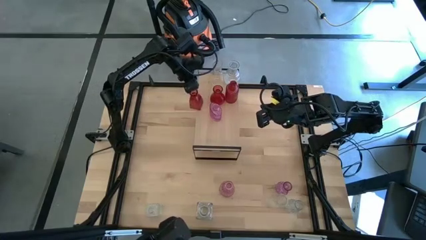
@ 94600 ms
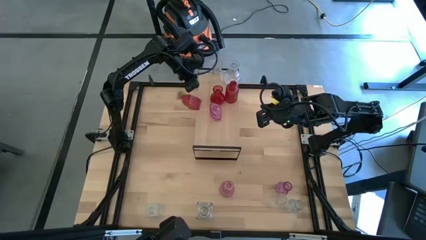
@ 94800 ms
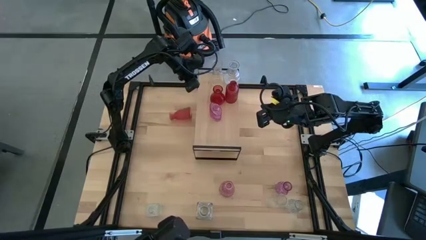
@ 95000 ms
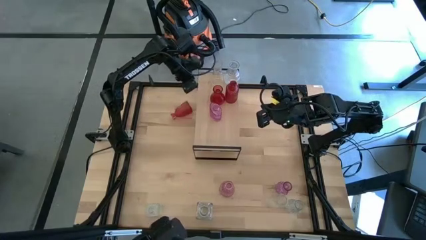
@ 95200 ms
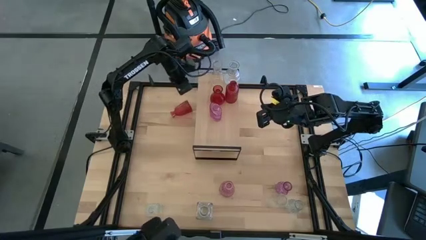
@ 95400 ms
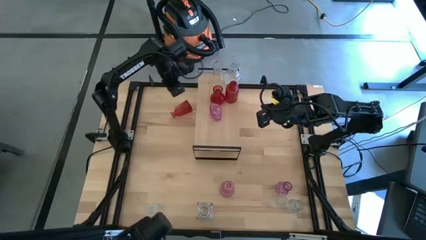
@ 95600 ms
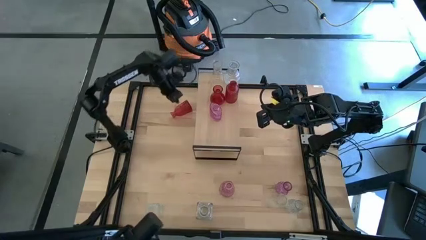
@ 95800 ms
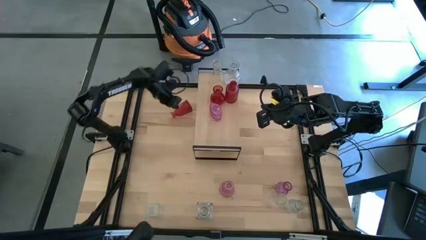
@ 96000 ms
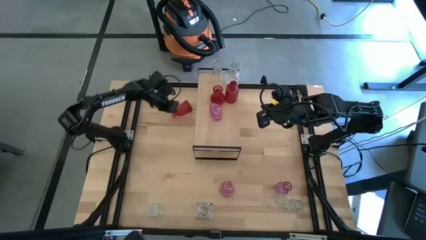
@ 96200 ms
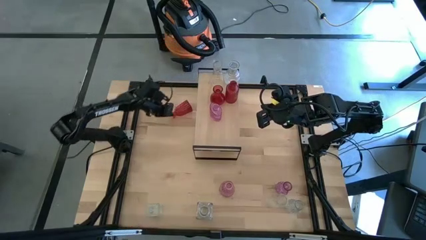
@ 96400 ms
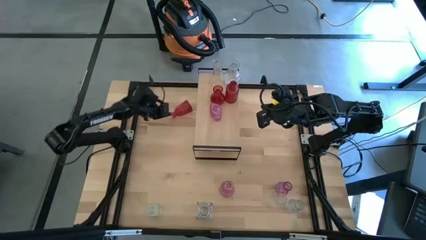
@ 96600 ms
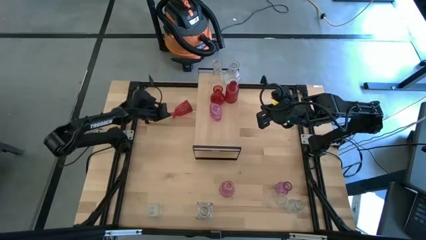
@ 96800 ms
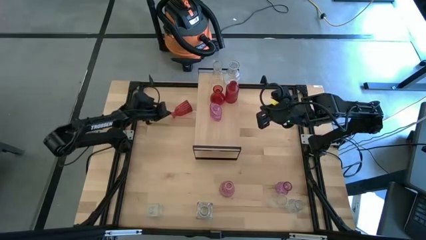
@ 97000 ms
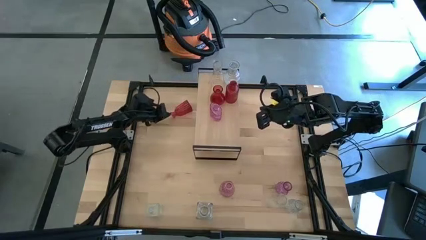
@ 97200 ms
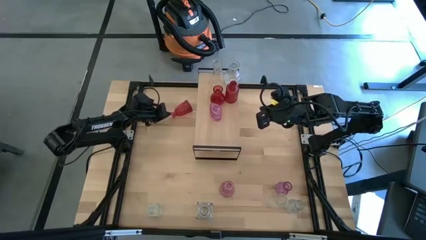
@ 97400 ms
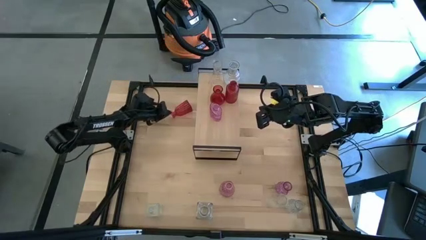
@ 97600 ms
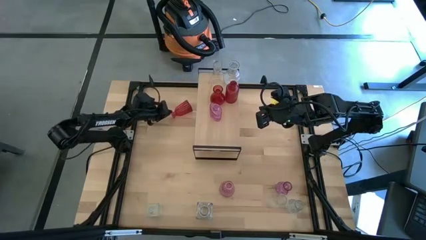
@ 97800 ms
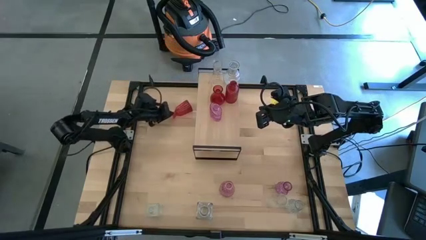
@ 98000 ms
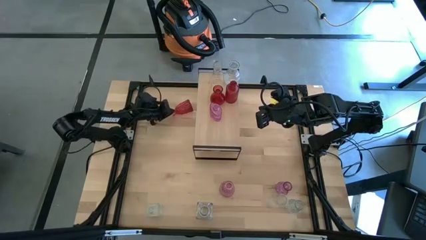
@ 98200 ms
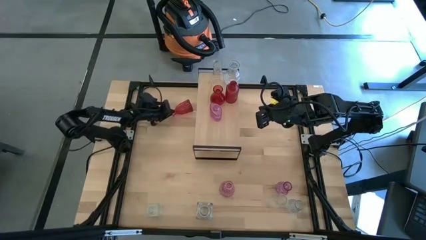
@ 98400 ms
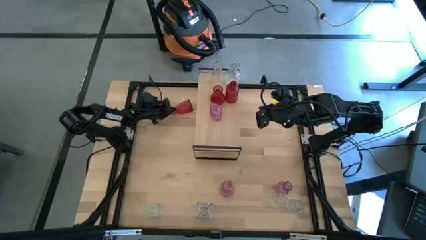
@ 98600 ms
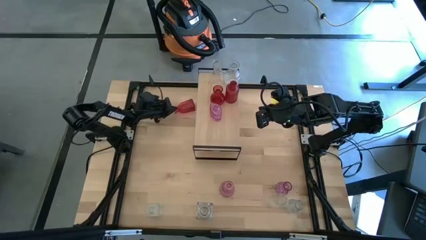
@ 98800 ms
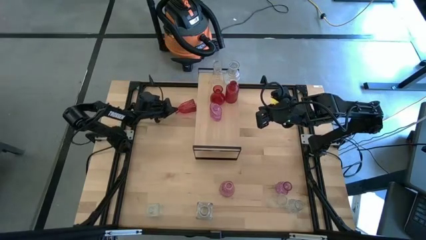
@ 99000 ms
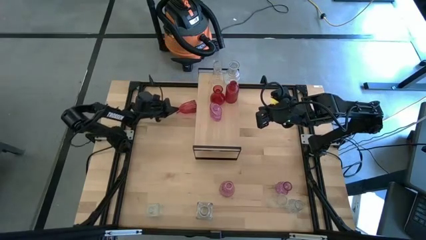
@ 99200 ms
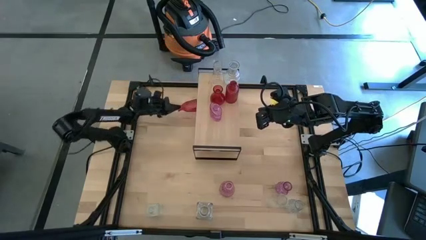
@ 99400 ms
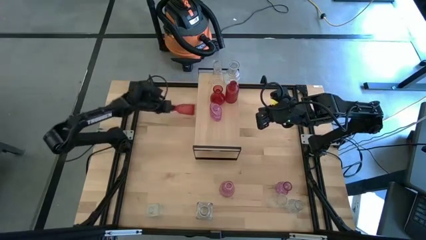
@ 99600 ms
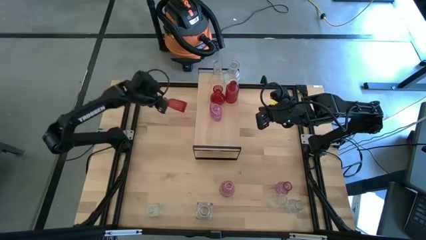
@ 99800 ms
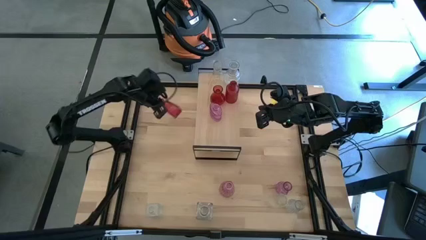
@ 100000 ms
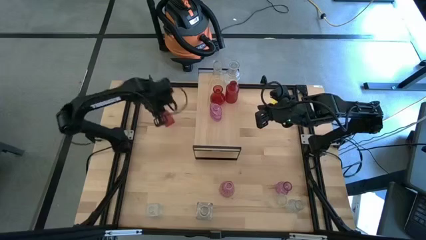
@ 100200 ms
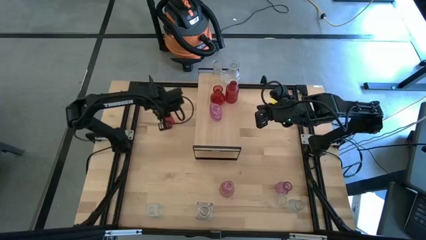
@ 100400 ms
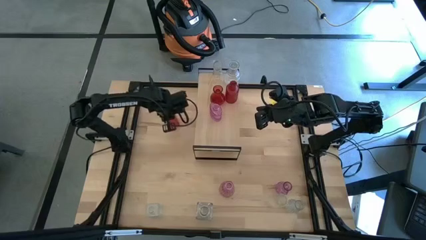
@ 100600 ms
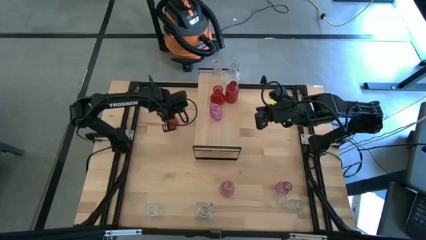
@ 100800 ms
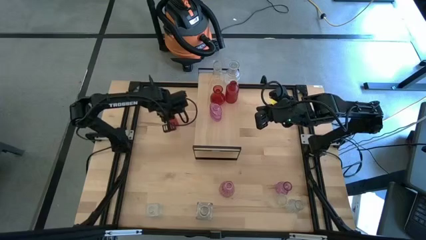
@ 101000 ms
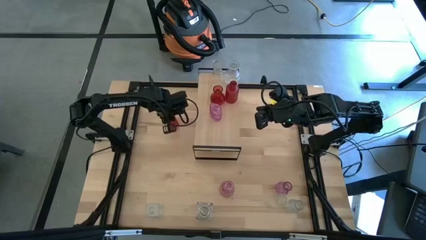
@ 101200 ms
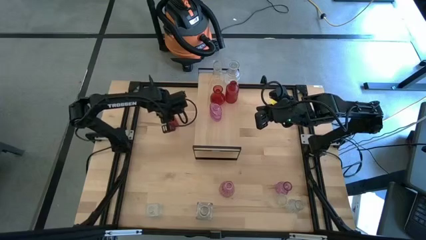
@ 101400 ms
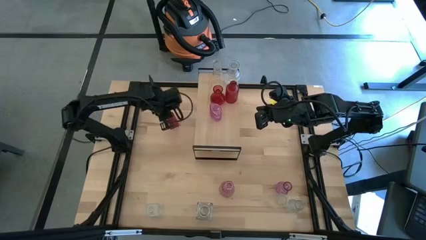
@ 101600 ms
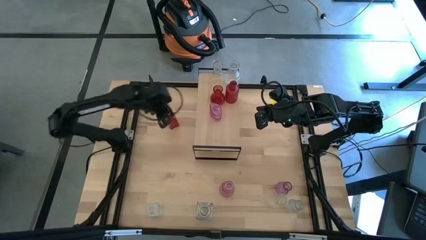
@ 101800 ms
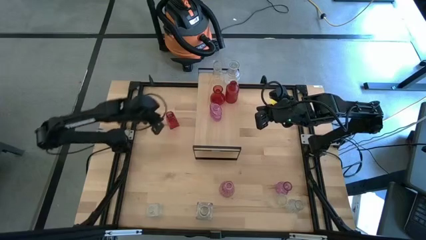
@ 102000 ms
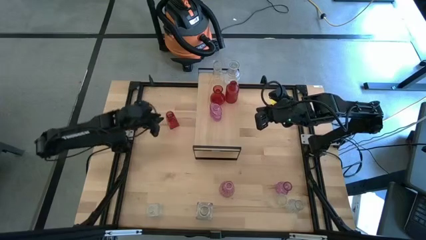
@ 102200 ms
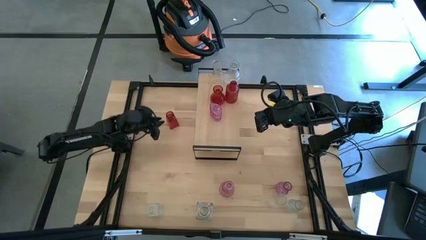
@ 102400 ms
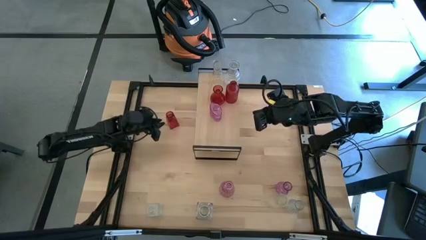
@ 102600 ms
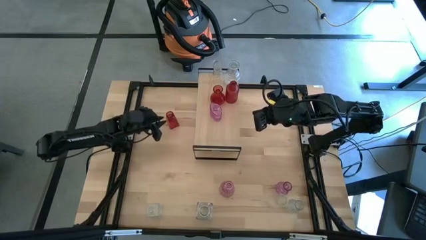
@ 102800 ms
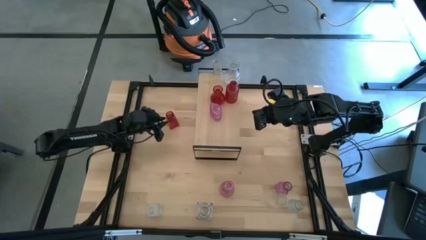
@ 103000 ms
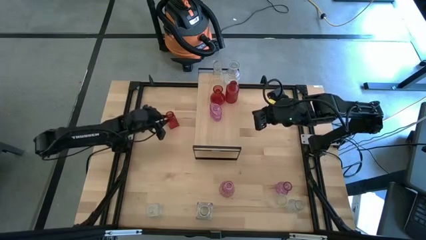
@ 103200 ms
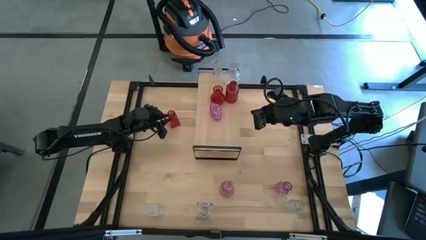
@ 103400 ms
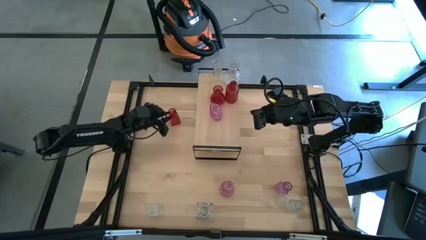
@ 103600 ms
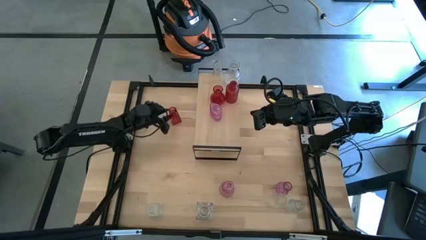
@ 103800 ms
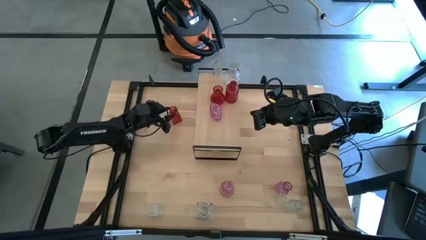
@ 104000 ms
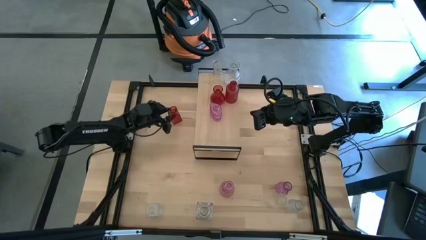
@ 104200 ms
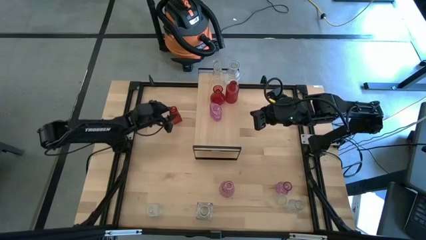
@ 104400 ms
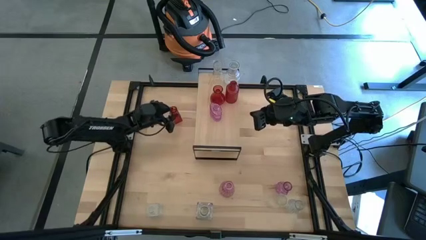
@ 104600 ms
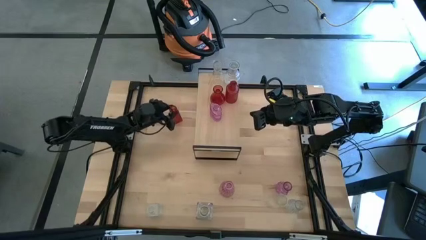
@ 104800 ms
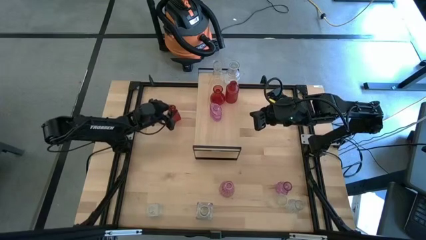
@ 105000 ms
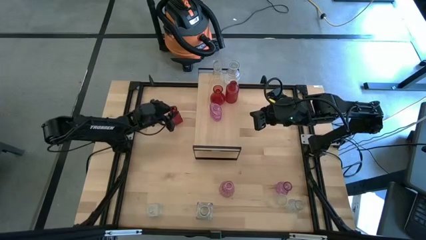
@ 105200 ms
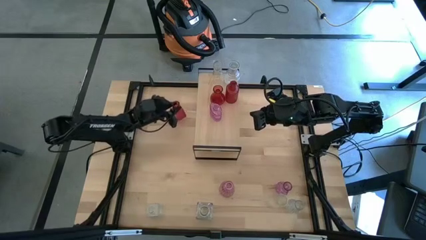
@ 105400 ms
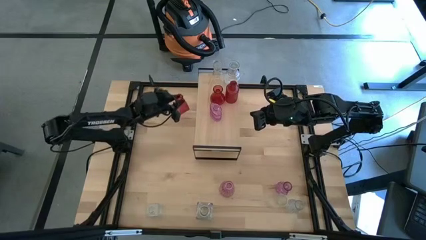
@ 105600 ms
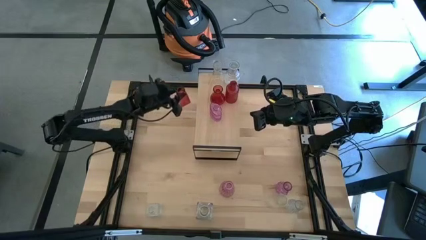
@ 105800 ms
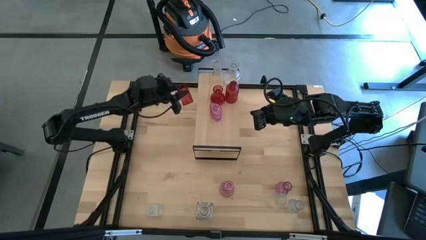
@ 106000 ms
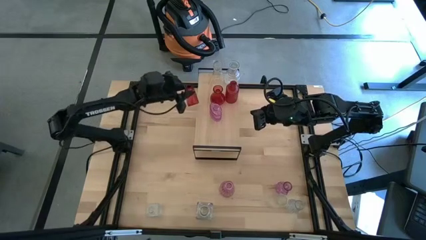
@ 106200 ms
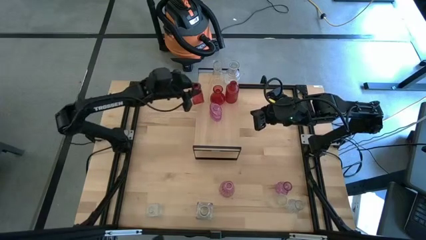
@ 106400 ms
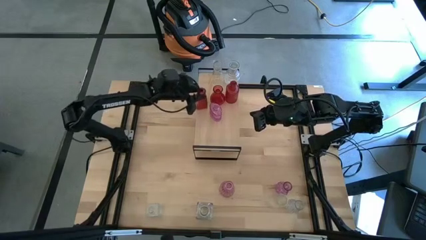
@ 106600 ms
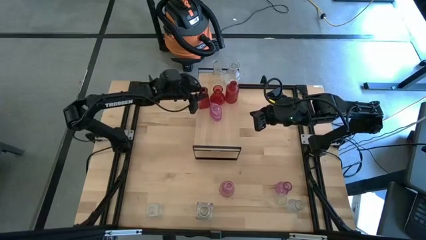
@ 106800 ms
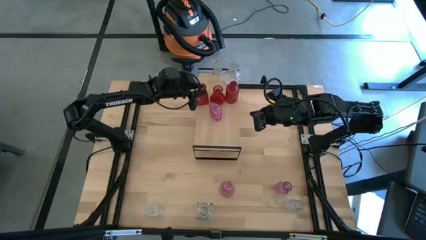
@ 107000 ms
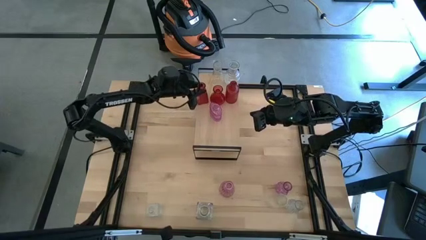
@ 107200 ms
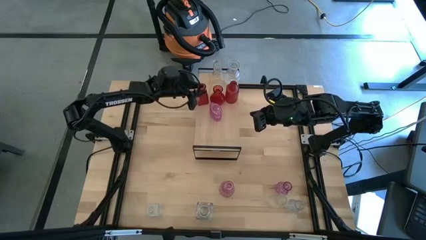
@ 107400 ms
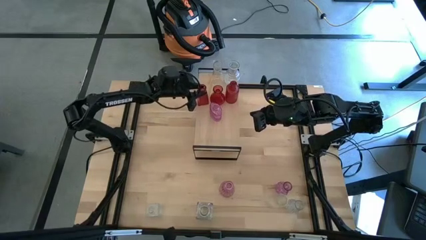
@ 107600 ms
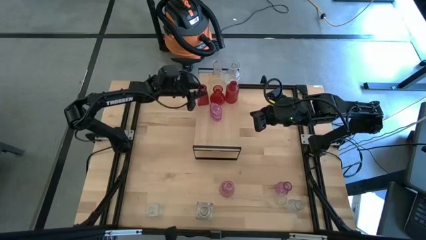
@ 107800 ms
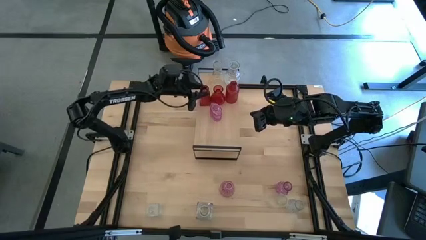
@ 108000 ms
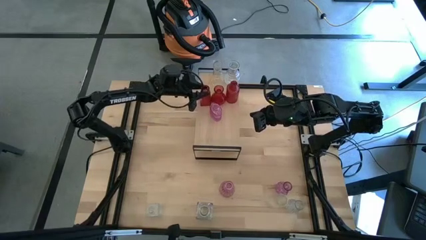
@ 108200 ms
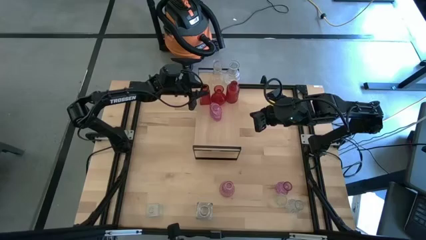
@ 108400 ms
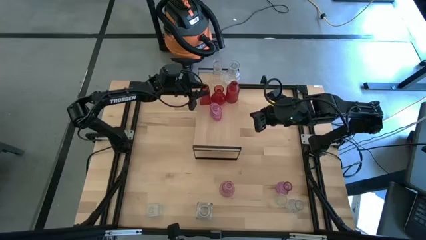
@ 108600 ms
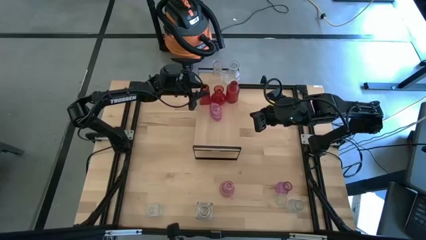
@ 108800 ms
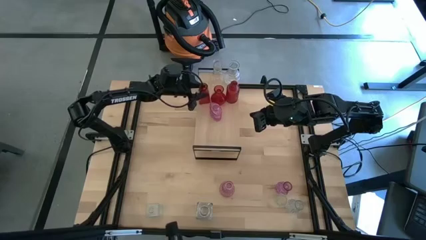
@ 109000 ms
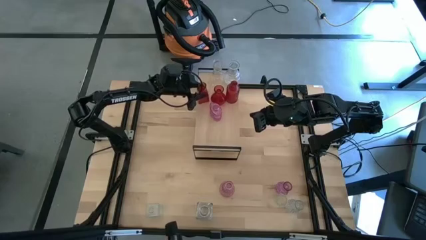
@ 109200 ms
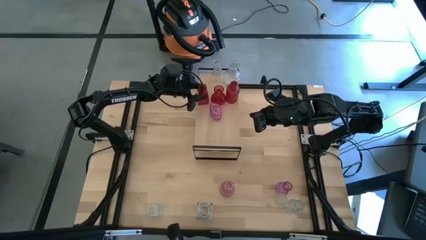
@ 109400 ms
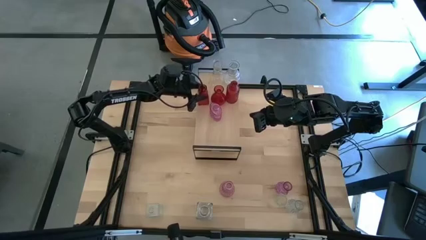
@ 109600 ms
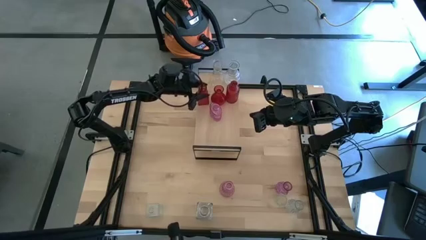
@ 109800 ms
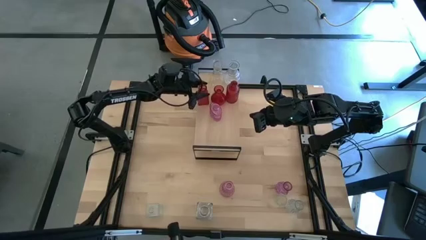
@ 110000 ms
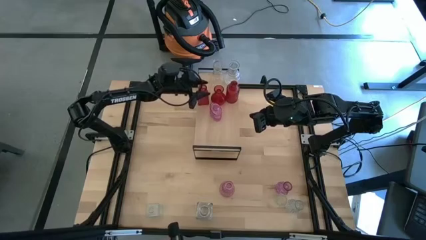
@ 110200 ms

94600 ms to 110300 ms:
Task: sort vases onto shelf
Put the red vase on the shelf aligned with the other red vase
